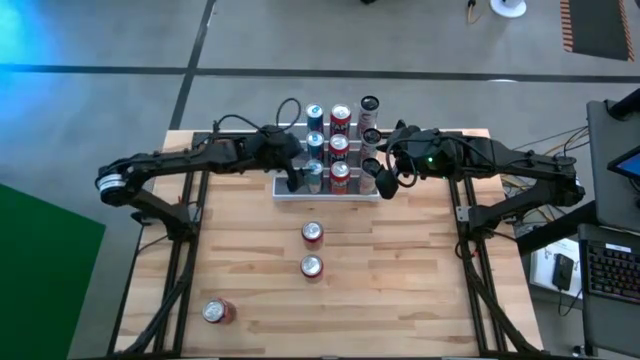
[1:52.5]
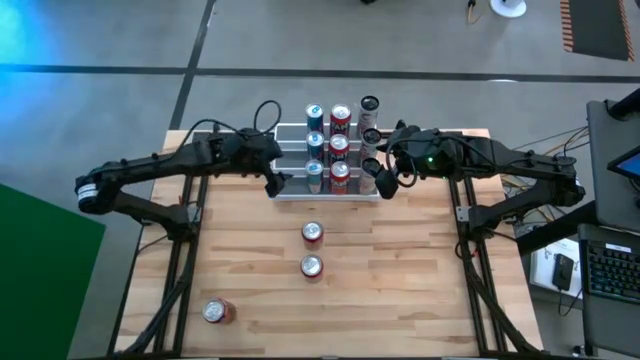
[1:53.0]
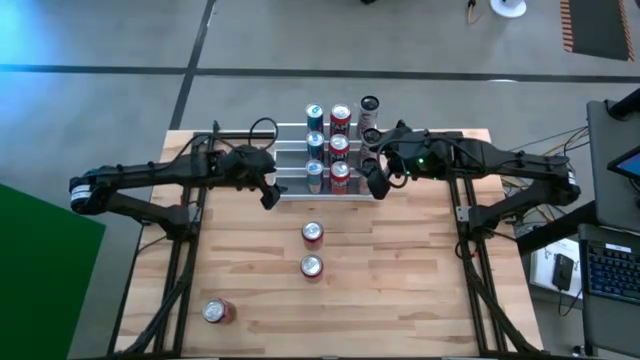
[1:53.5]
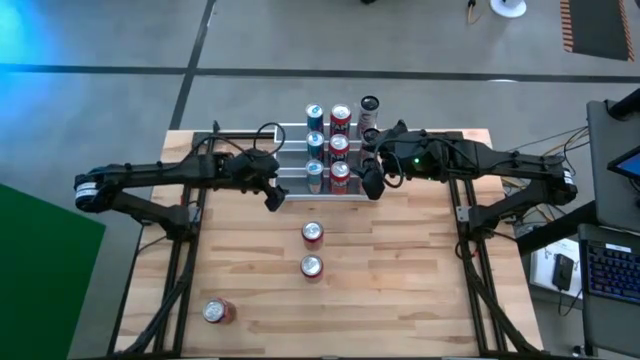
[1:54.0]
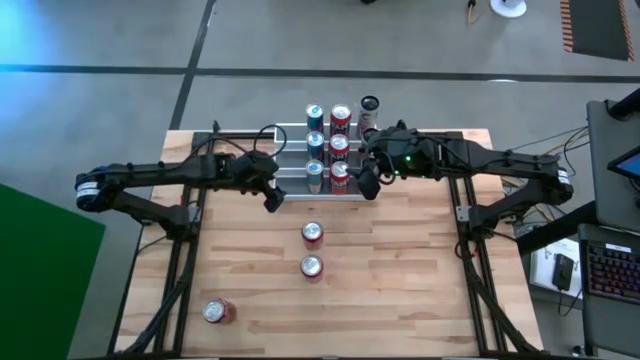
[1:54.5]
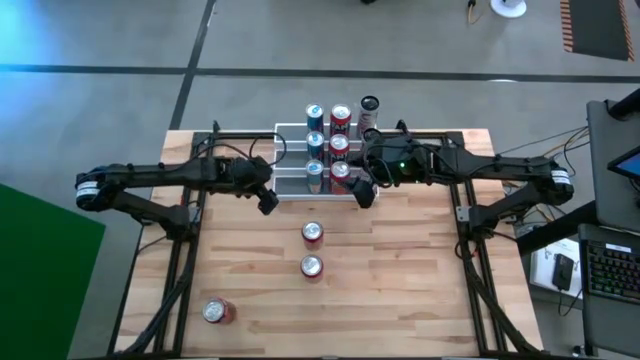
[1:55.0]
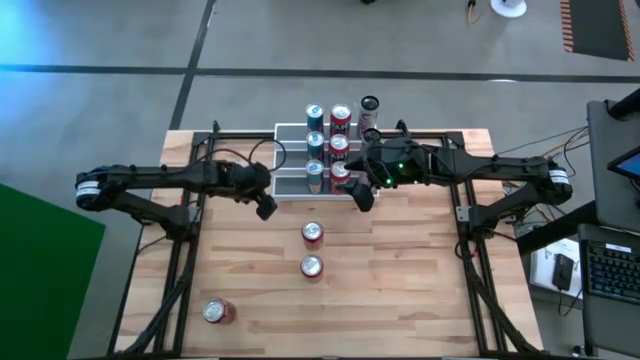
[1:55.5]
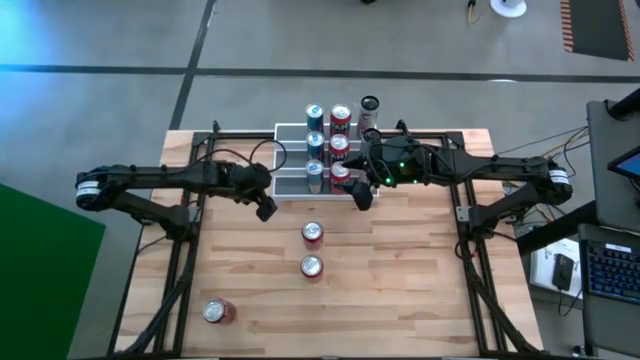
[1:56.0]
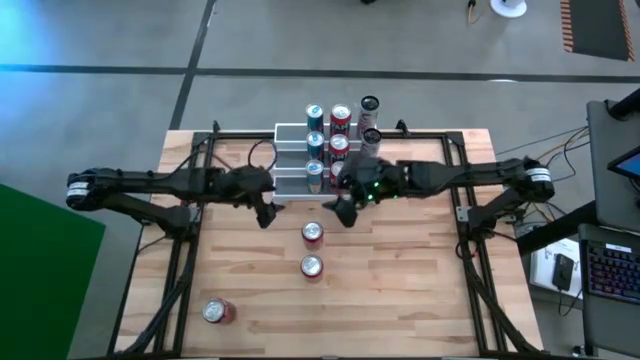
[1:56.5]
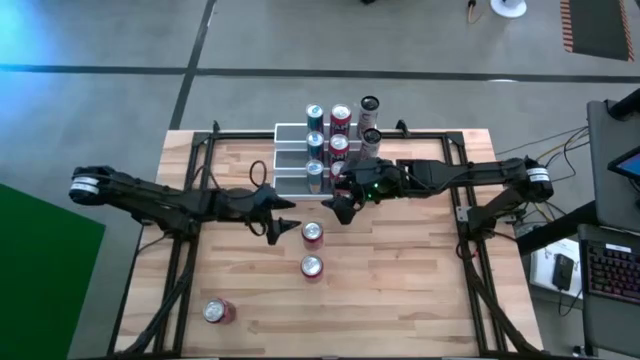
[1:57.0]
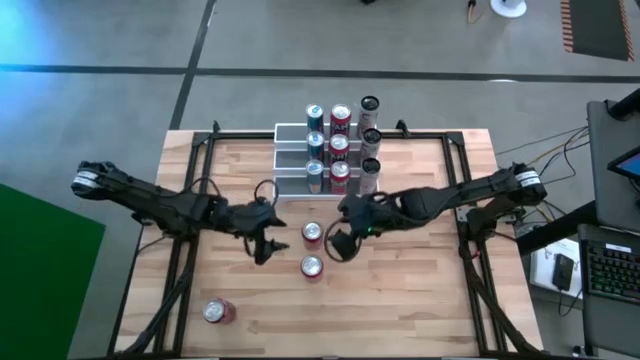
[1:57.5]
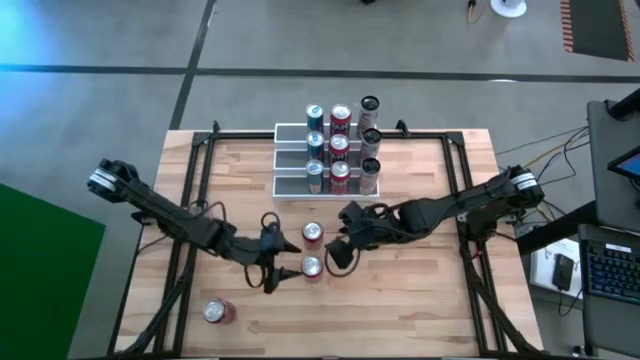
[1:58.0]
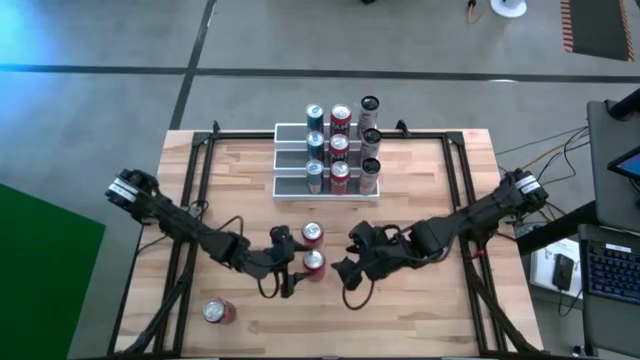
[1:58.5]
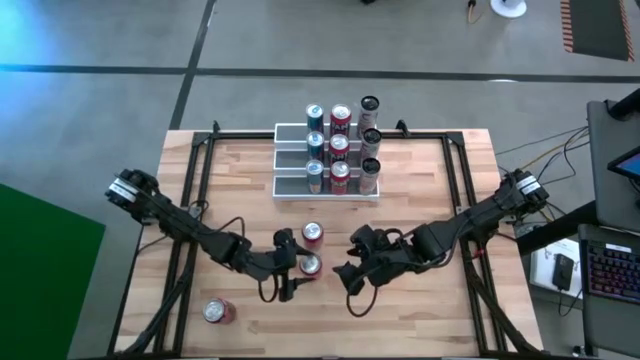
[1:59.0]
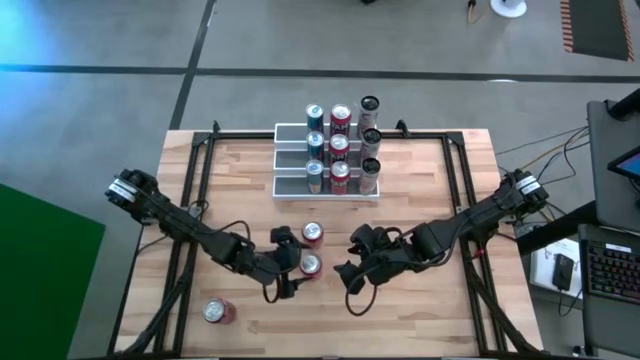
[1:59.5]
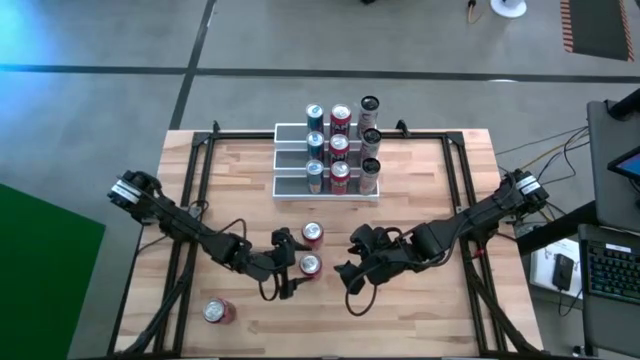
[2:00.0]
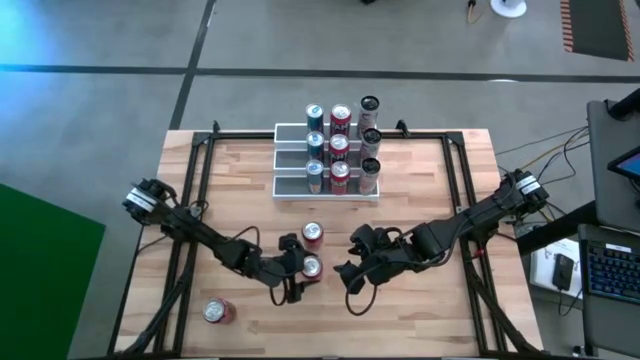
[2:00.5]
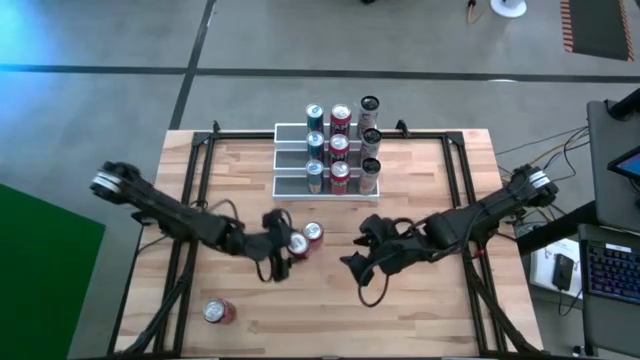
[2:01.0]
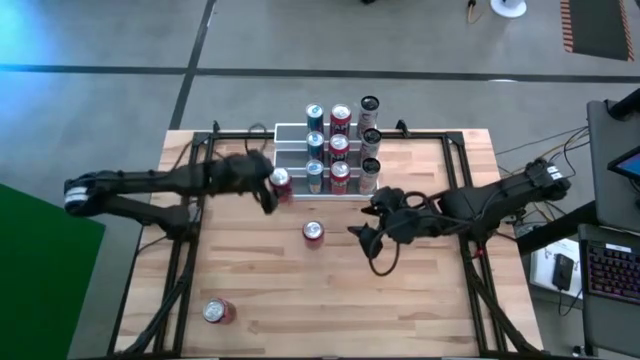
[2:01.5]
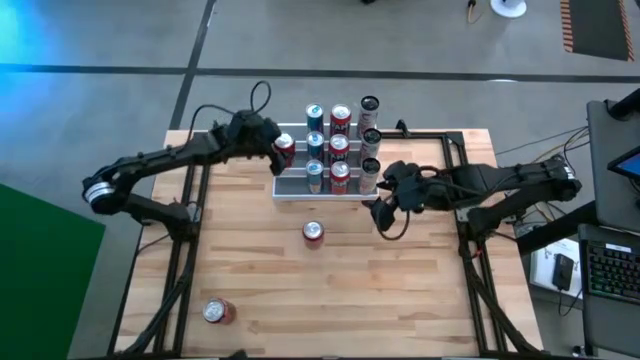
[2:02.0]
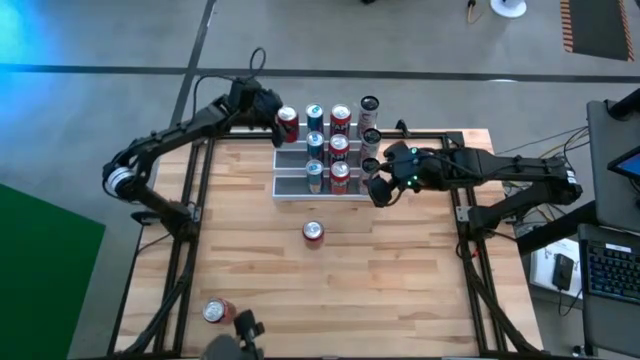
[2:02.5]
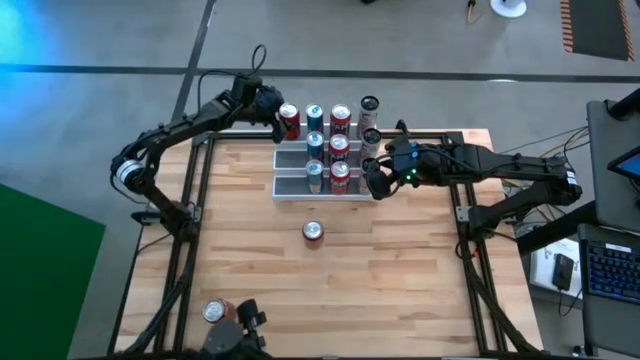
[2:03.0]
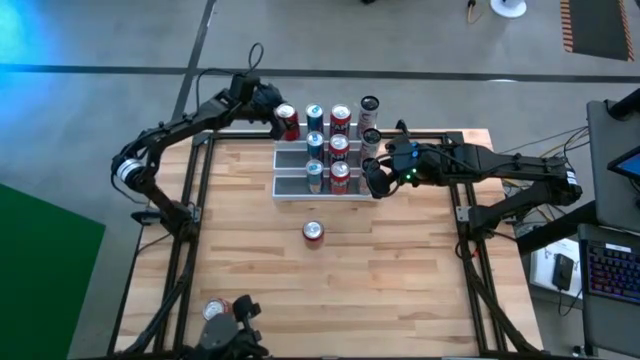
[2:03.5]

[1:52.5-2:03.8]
Task: Place canned beverage on shelf
Put the center red soda can on the top tier of the shelf

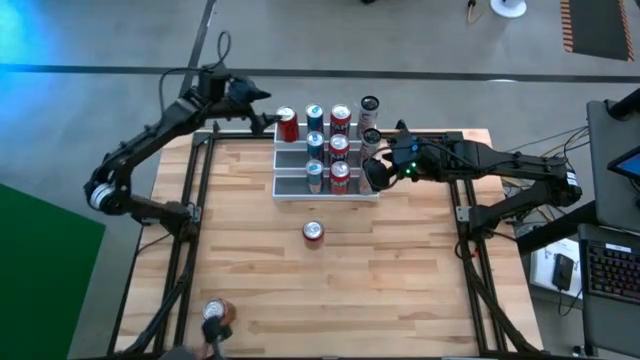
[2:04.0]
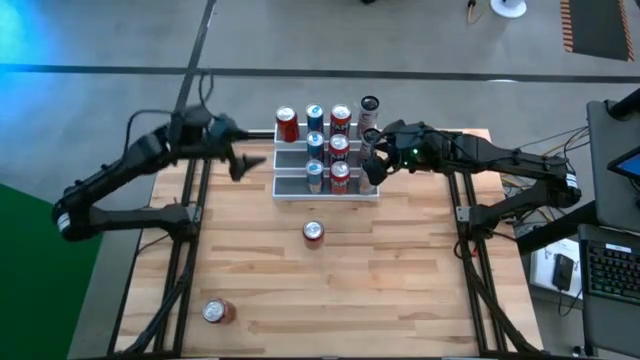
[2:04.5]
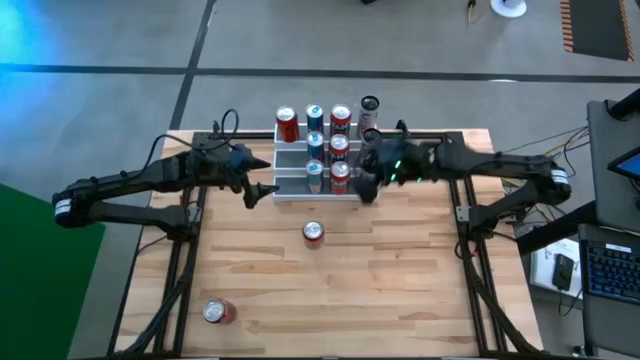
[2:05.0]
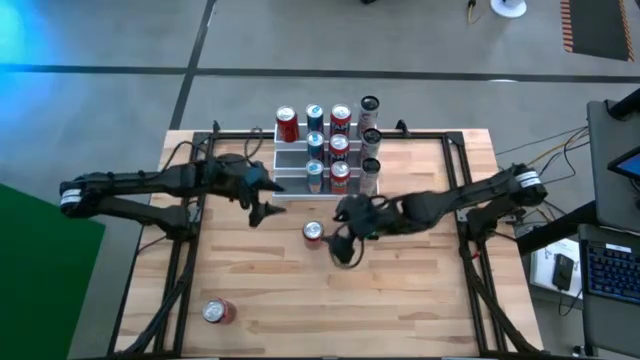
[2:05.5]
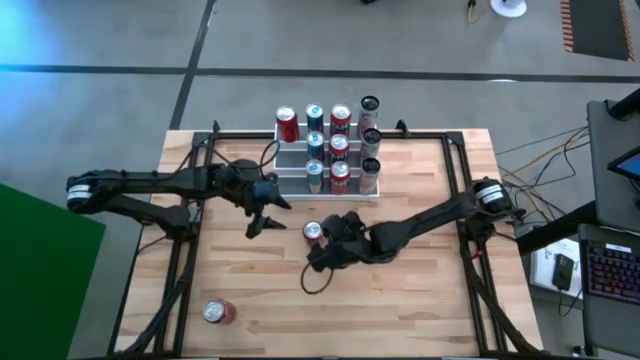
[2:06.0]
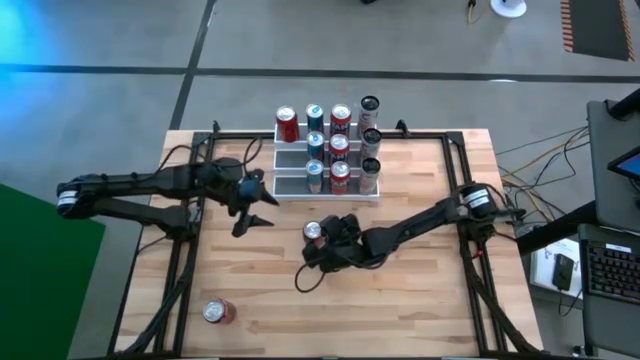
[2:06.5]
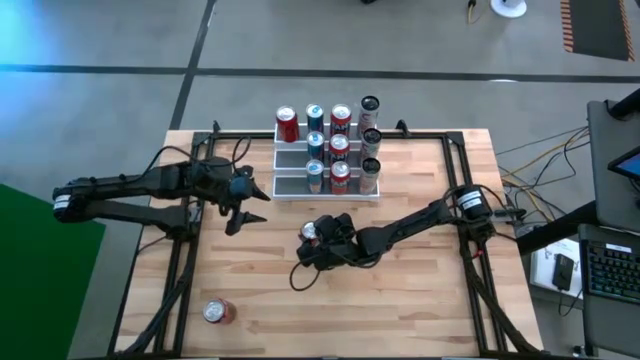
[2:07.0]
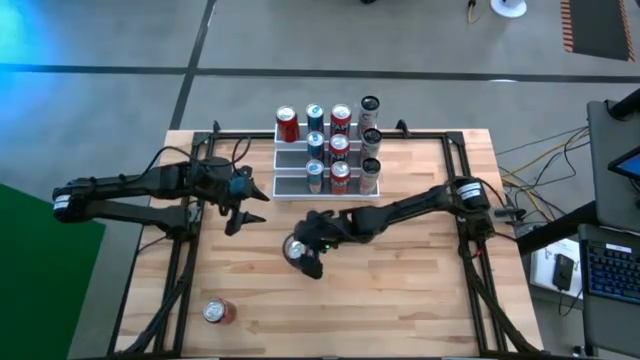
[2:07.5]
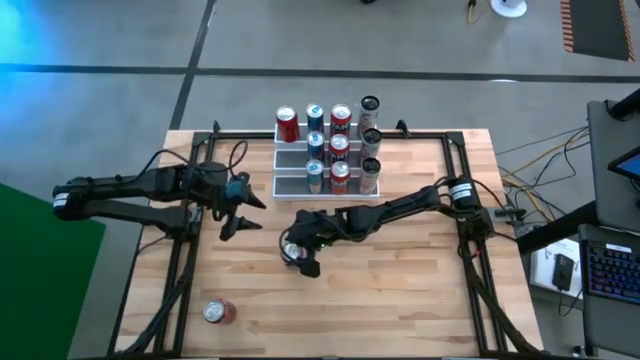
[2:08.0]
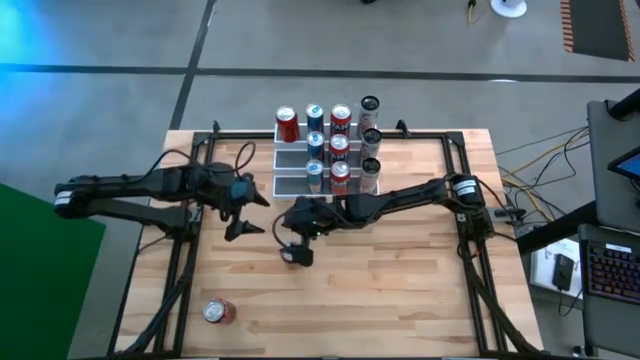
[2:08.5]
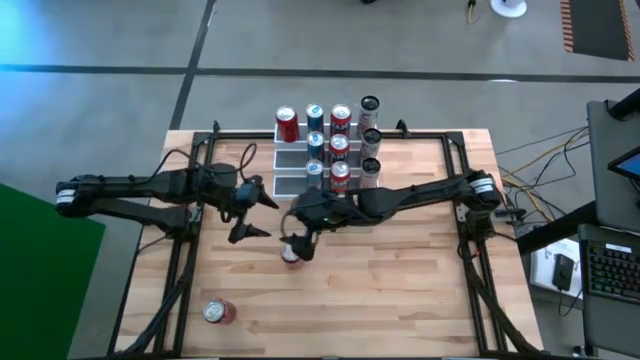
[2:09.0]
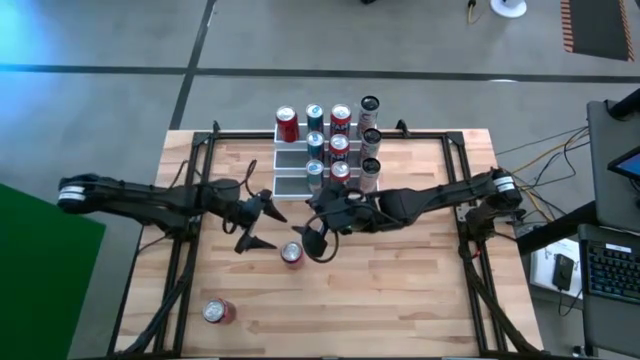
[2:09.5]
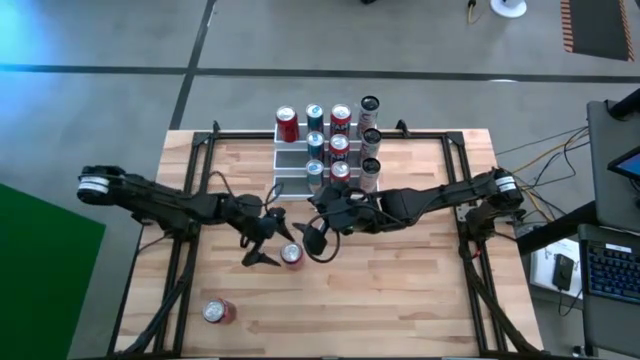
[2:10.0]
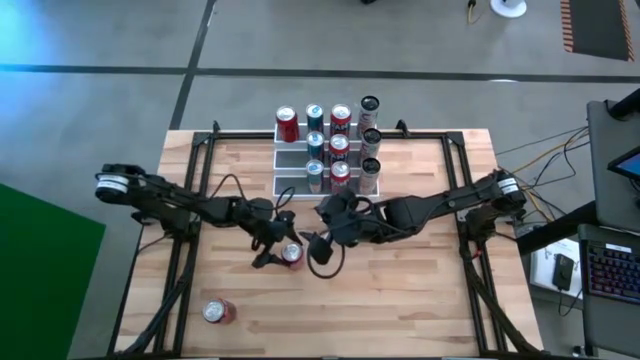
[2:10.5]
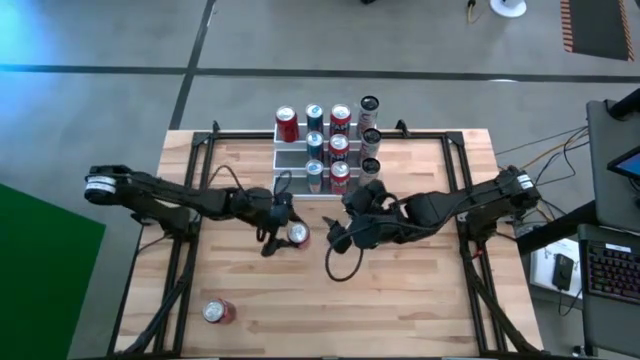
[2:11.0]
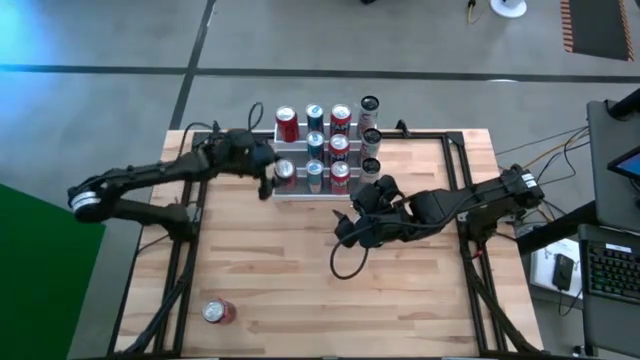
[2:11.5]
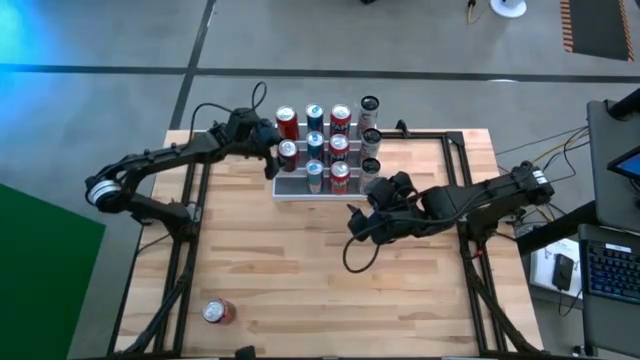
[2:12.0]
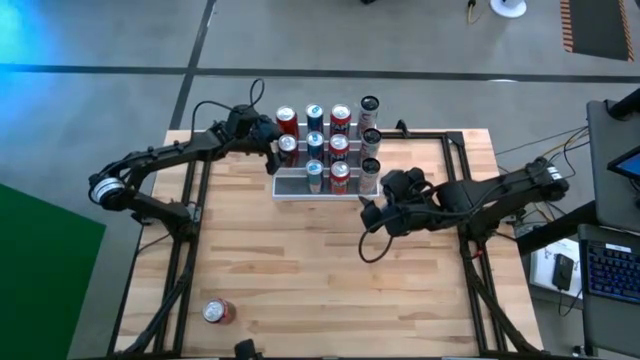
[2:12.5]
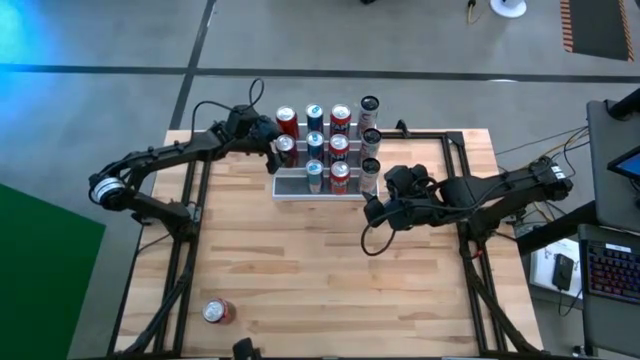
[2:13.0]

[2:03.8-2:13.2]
Put the top red soda can on the middle tier of the shelf aligned with the red soda can

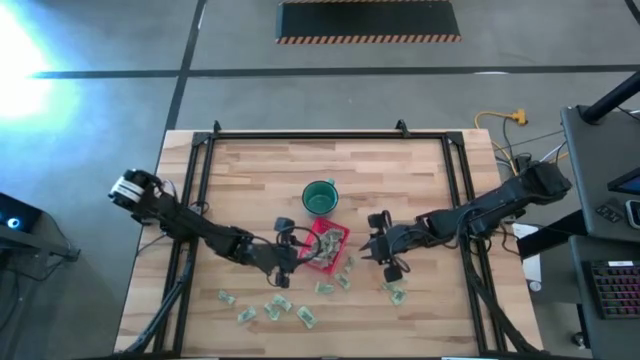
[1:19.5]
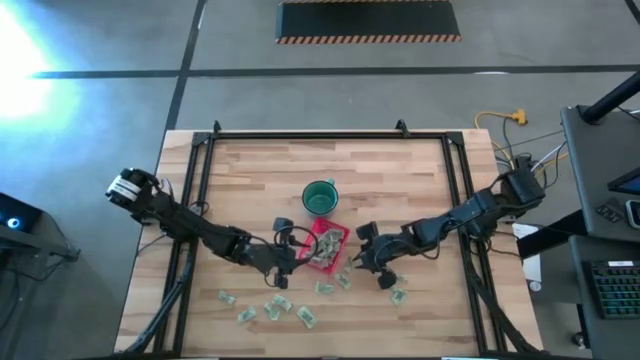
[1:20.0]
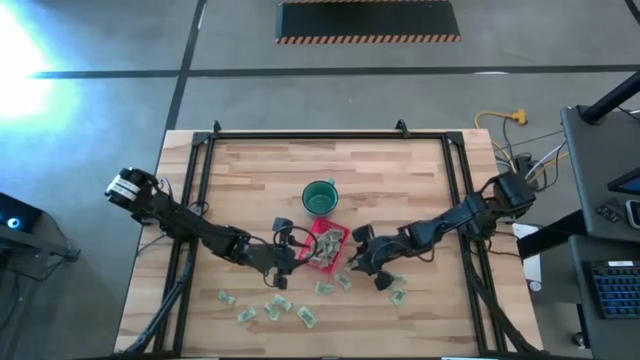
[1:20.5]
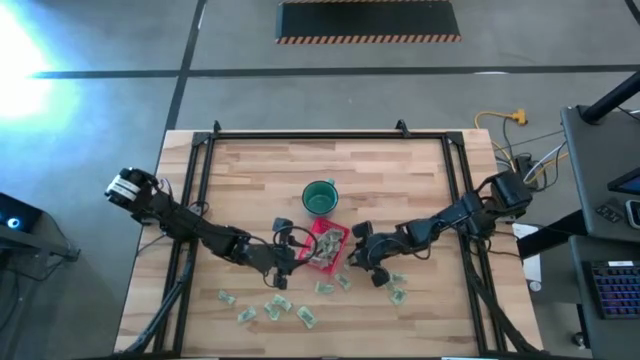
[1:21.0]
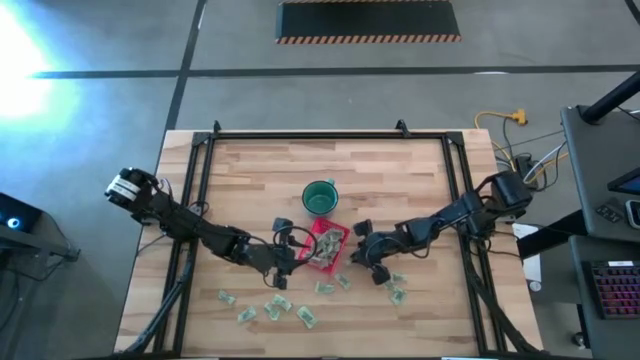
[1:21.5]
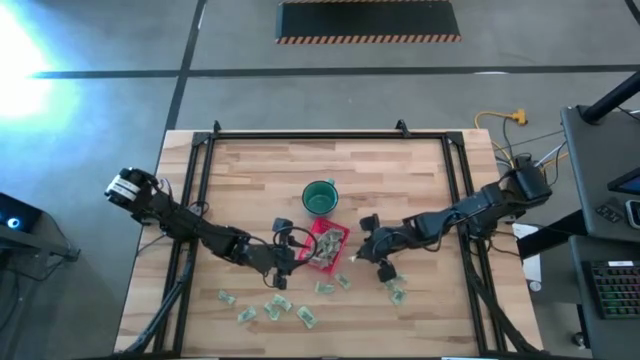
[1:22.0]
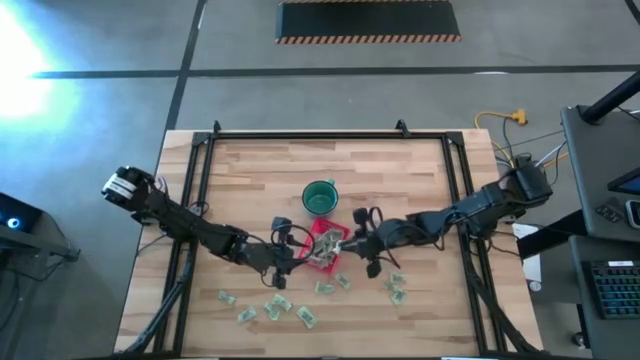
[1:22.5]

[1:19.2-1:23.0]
Task: Pick and place items into bin
Put the light green stevia packet into the red bin
